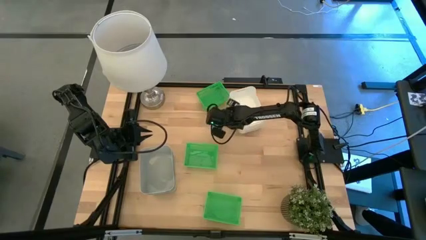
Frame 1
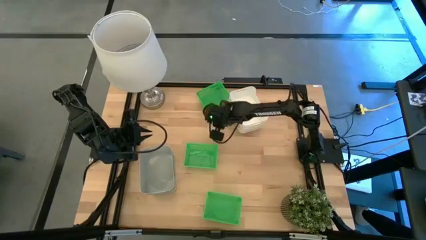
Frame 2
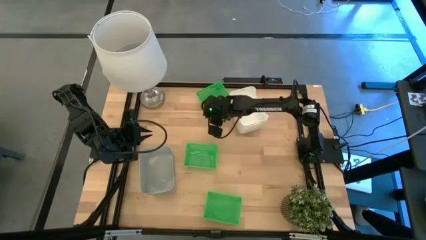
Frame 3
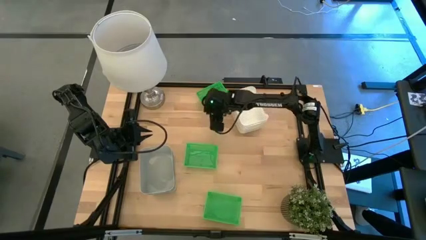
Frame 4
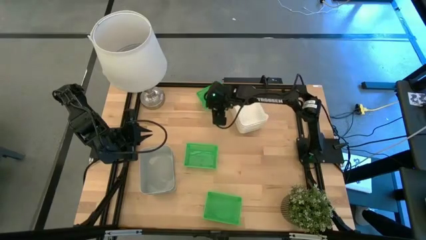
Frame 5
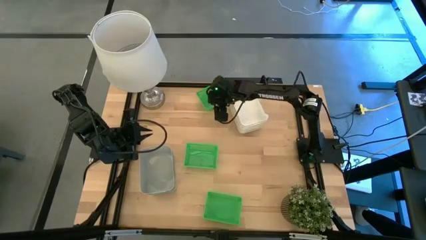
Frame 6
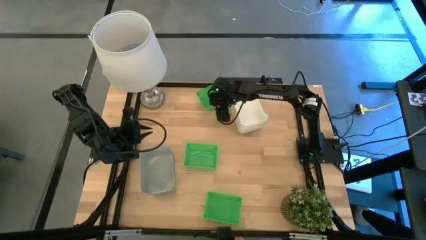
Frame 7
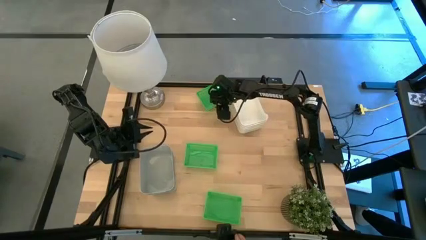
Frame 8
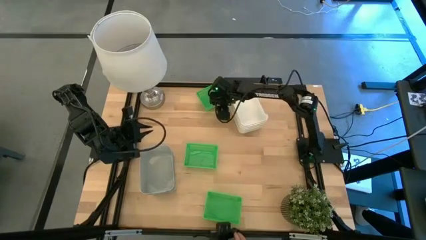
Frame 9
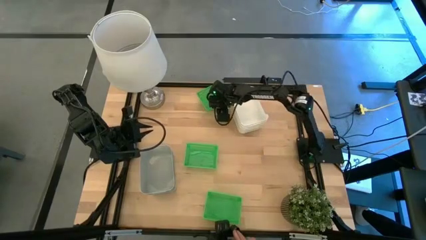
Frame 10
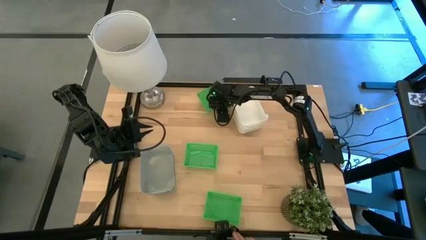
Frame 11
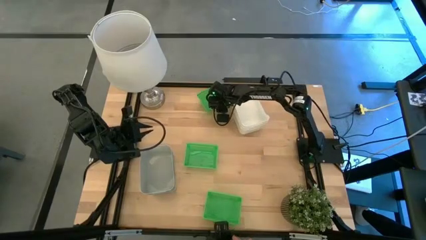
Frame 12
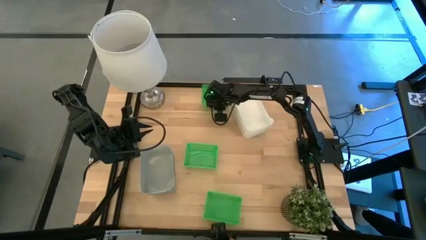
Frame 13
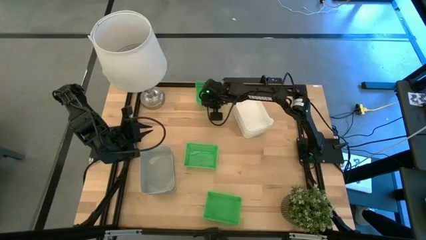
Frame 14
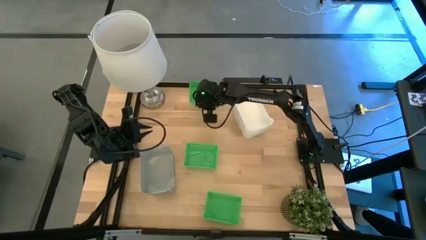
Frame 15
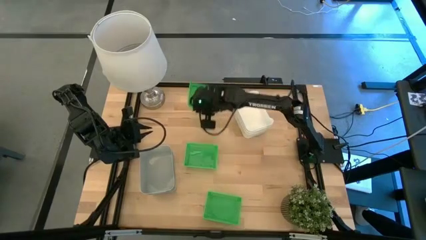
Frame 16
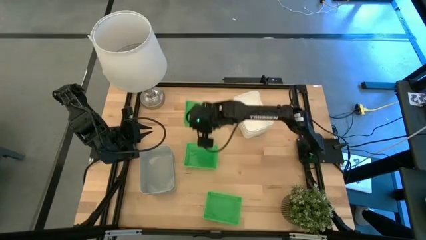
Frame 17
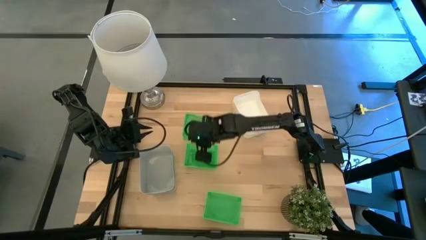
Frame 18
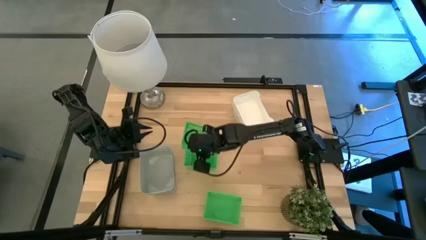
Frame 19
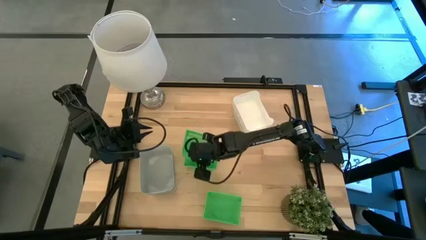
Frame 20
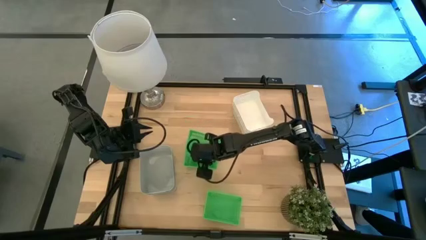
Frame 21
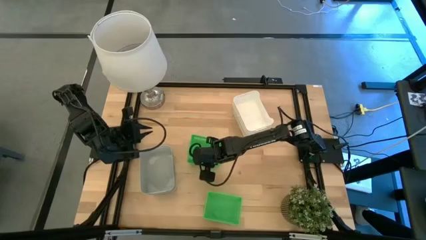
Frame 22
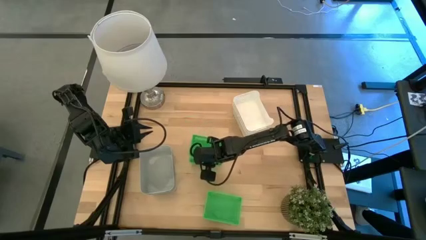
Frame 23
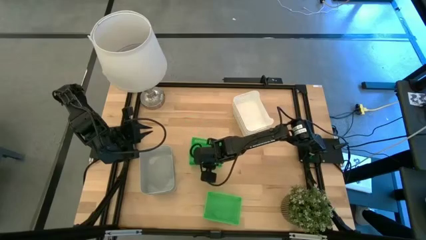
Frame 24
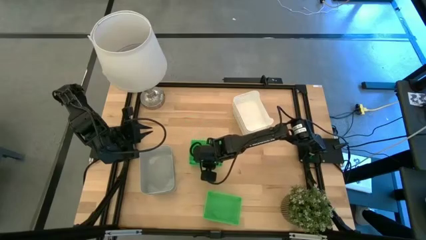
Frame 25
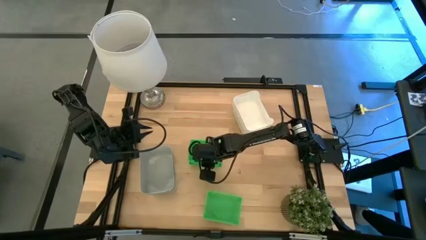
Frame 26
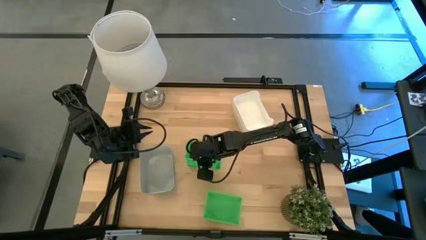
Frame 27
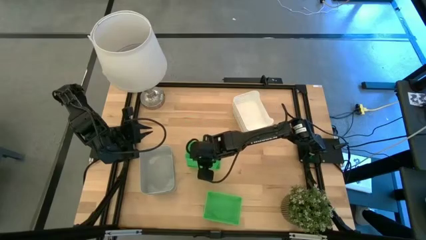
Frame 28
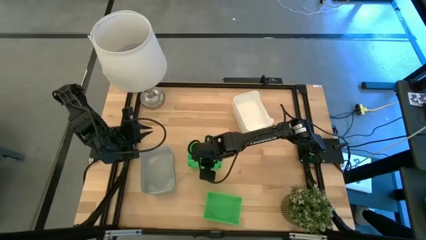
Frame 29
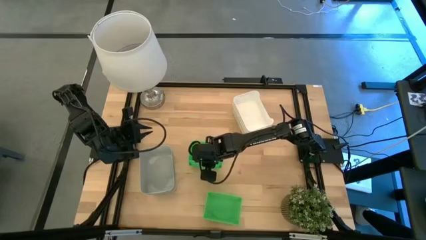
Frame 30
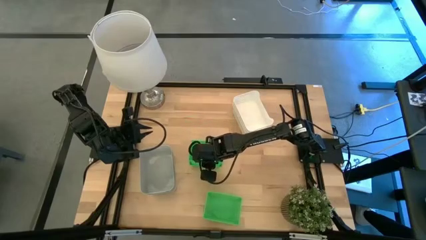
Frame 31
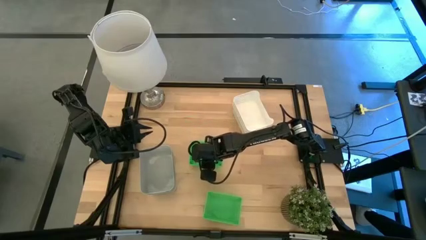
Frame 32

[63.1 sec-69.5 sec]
Stack the top green bin on top of the middle green bin

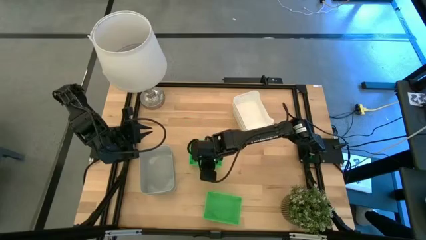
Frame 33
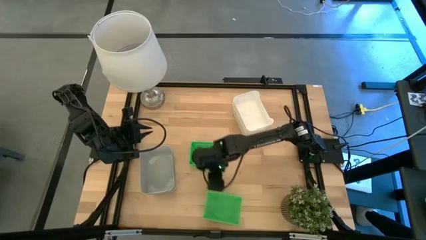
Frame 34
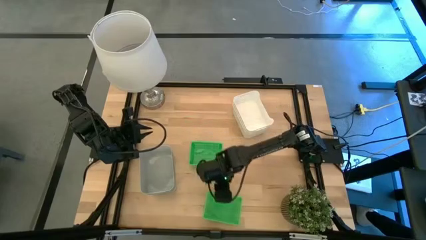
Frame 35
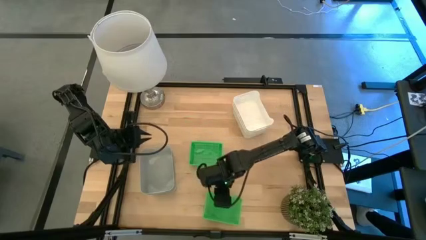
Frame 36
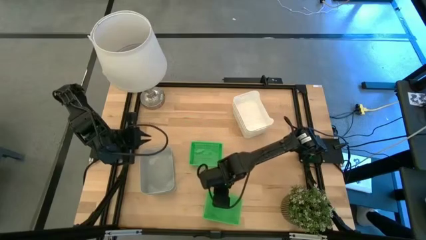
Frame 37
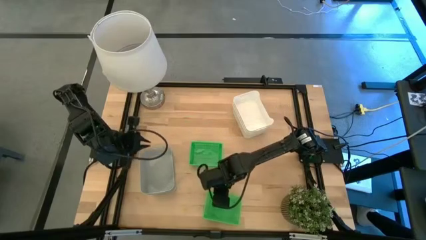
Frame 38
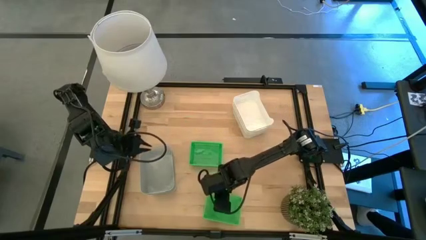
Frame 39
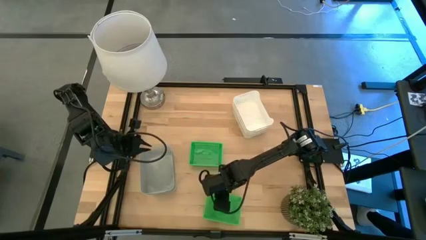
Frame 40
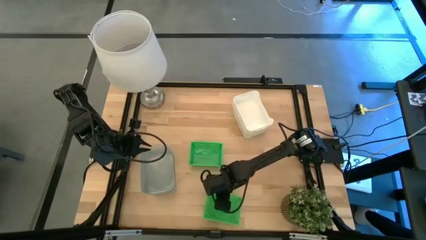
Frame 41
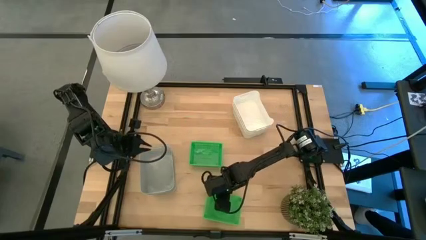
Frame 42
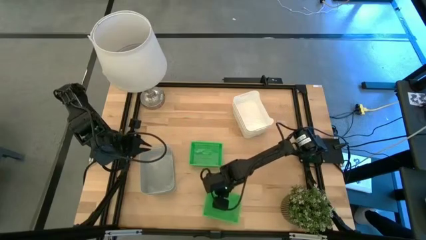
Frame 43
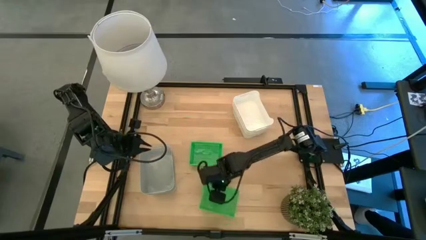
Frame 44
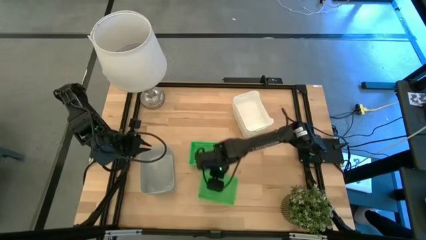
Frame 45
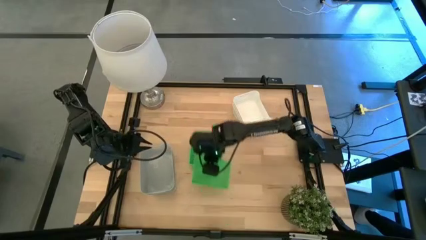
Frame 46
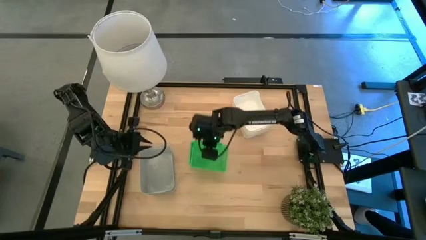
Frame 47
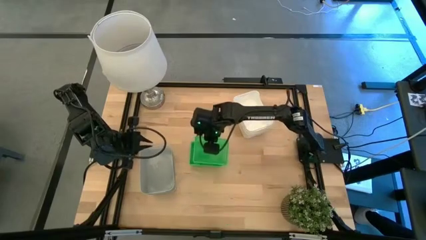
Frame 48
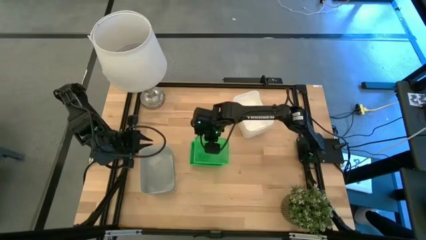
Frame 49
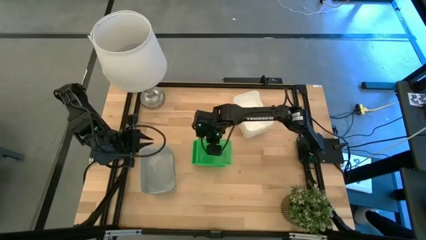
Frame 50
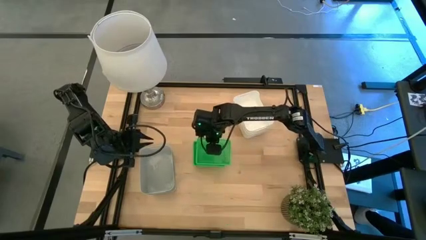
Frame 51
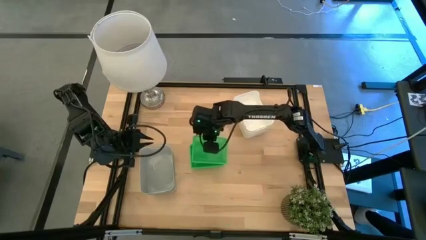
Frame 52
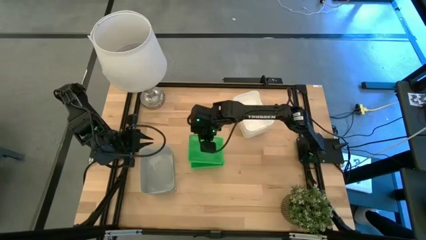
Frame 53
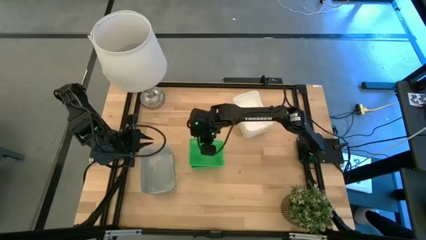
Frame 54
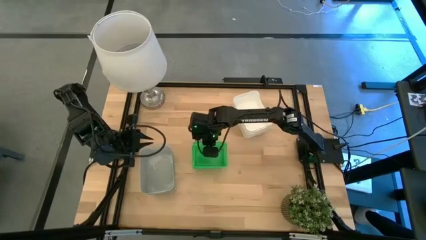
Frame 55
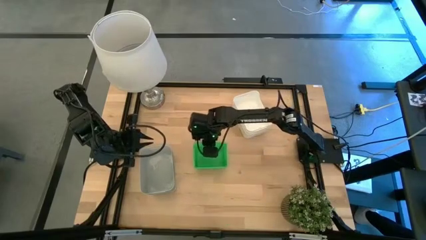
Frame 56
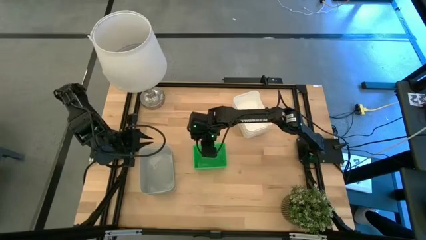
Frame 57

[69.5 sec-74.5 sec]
Stack the bottom green bin on top of the top green bin

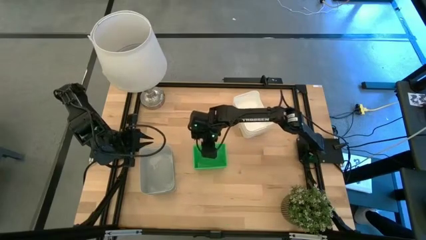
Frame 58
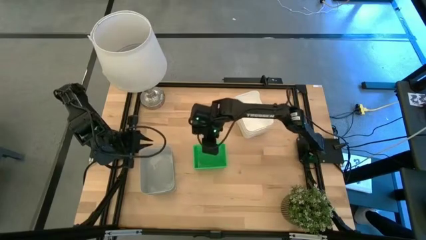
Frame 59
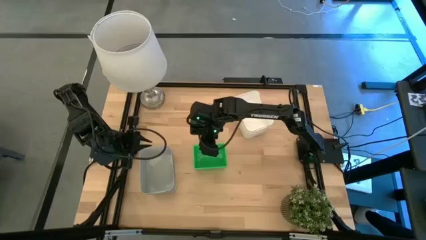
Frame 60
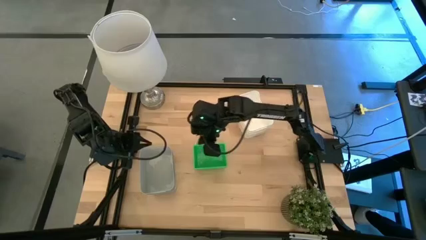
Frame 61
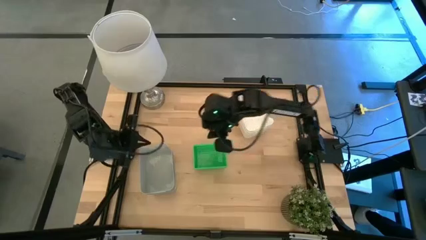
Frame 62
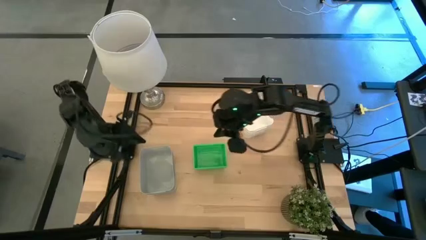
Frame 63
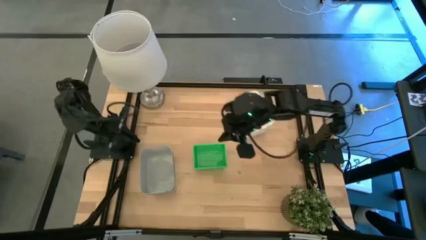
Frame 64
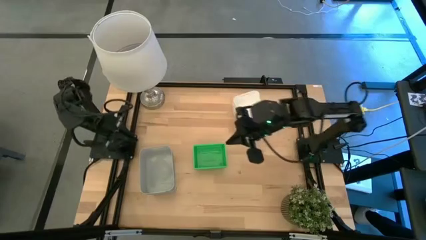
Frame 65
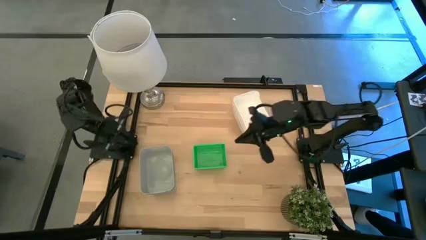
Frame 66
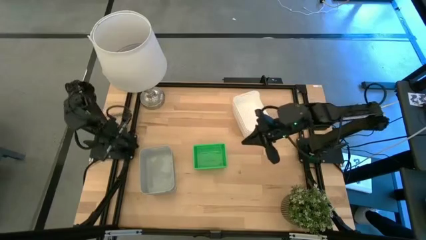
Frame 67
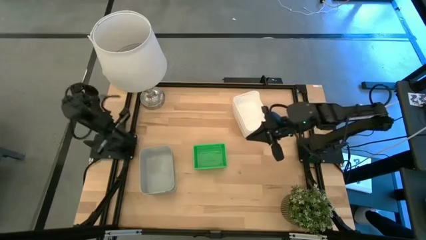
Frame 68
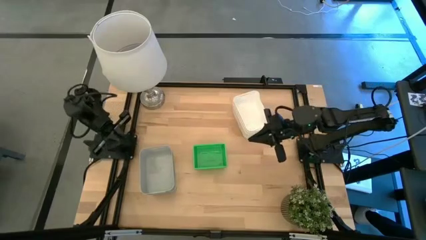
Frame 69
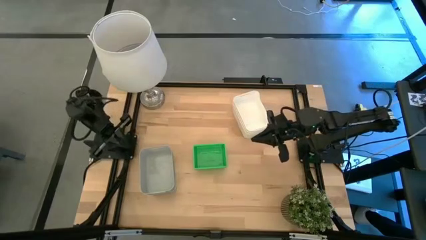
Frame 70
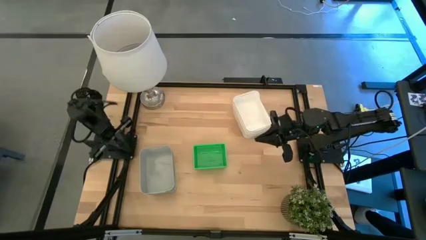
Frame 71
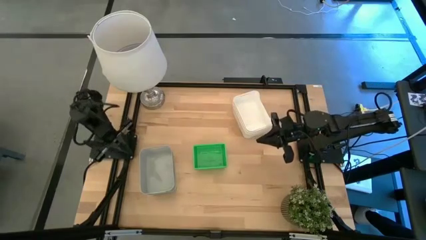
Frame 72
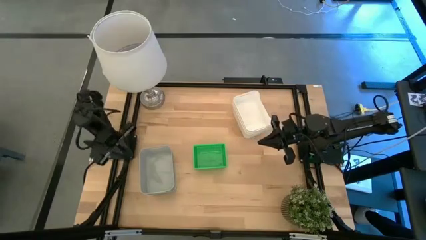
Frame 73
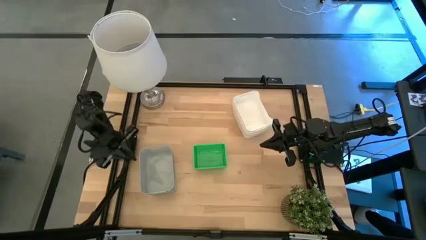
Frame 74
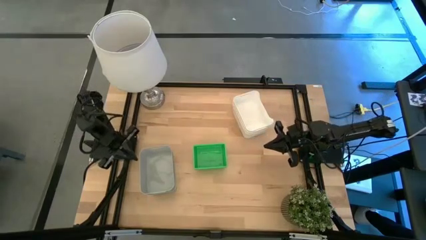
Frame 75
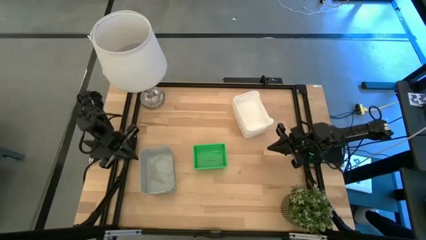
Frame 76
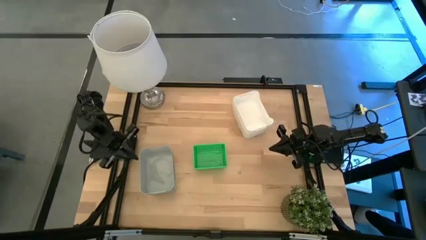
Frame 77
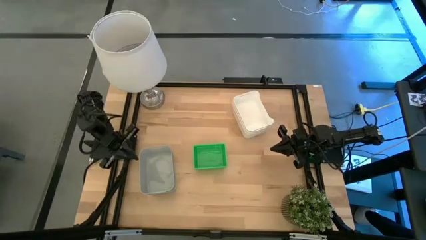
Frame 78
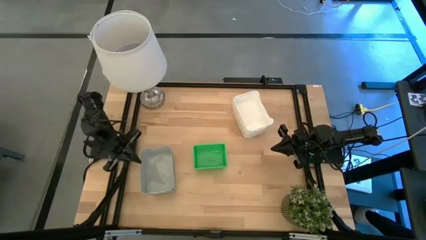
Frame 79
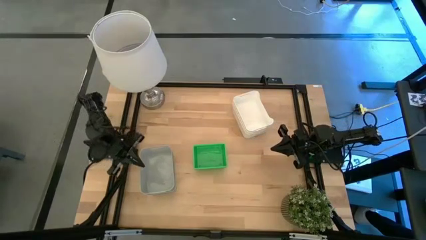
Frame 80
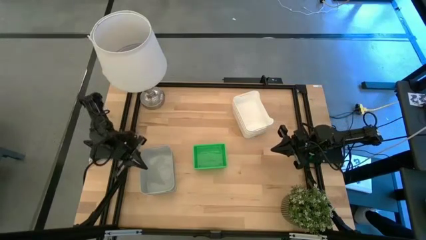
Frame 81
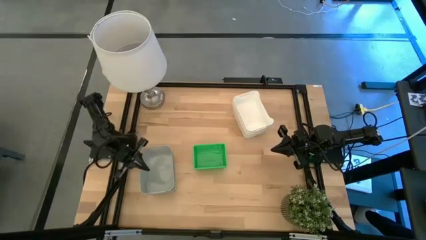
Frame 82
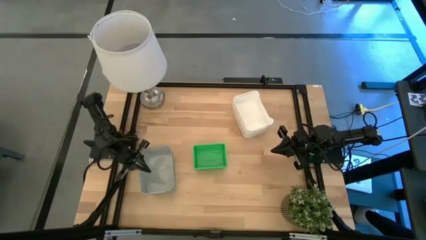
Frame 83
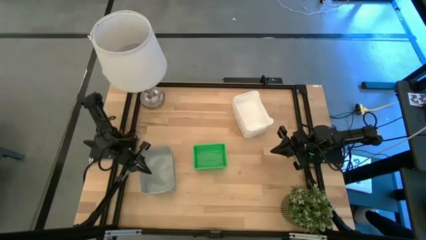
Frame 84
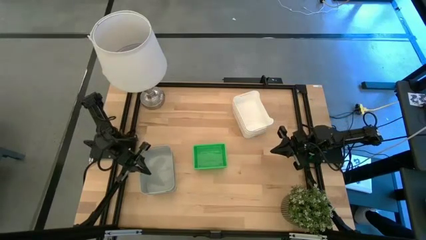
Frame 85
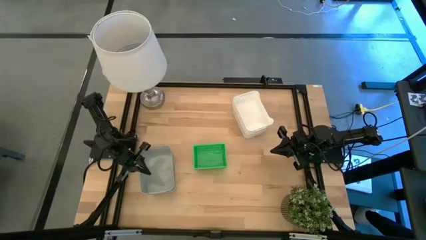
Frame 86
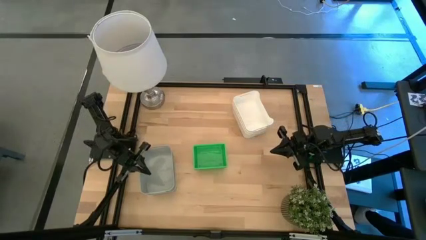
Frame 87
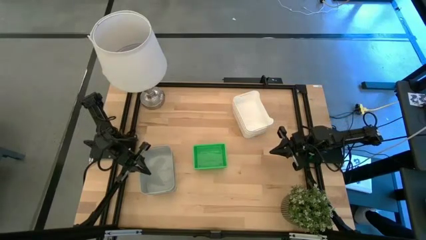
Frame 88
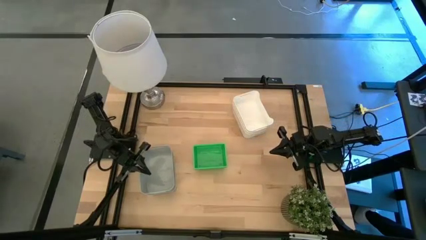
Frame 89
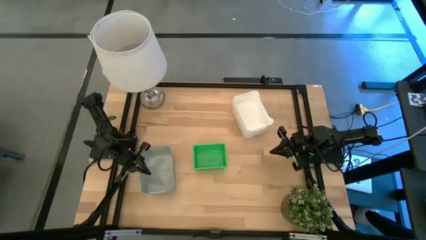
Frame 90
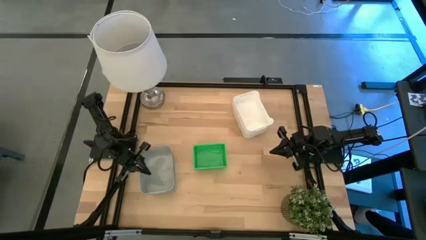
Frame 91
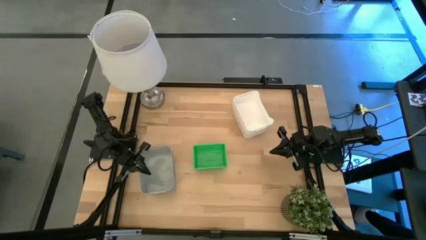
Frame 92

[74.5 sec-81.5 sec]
Return to Home Position
